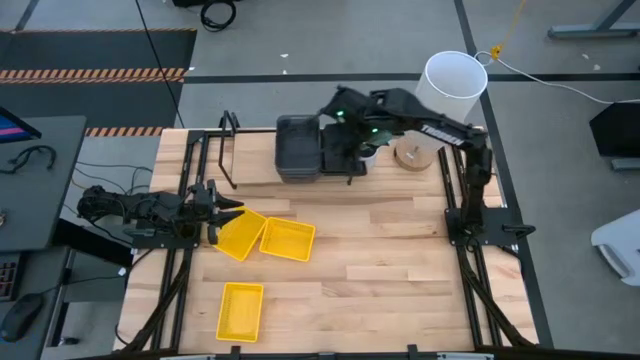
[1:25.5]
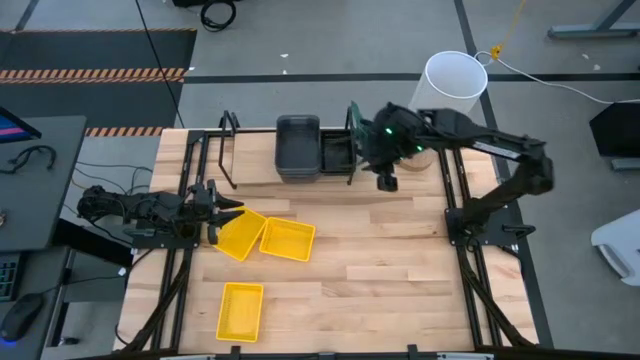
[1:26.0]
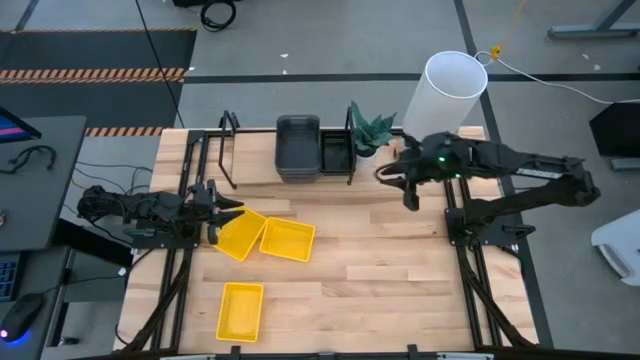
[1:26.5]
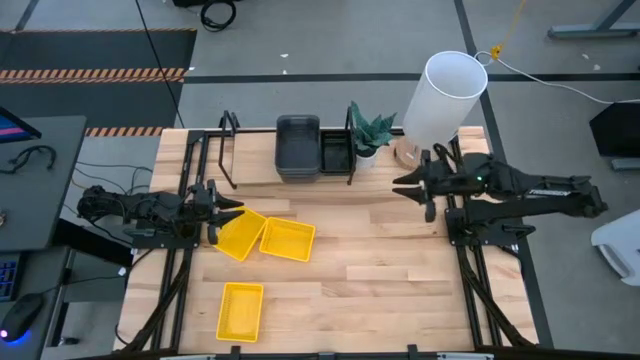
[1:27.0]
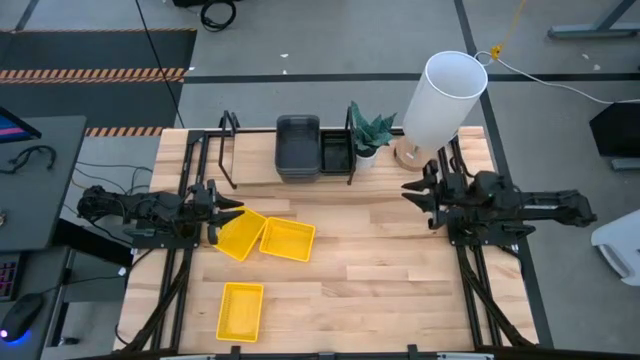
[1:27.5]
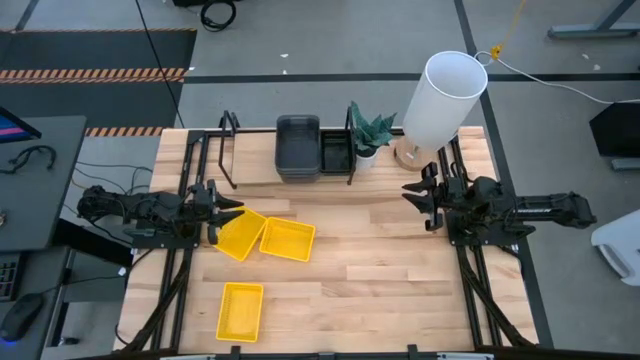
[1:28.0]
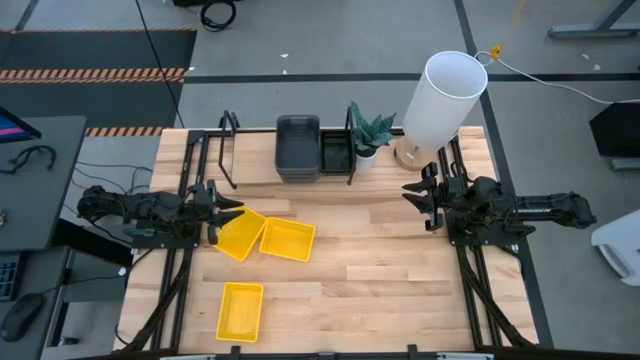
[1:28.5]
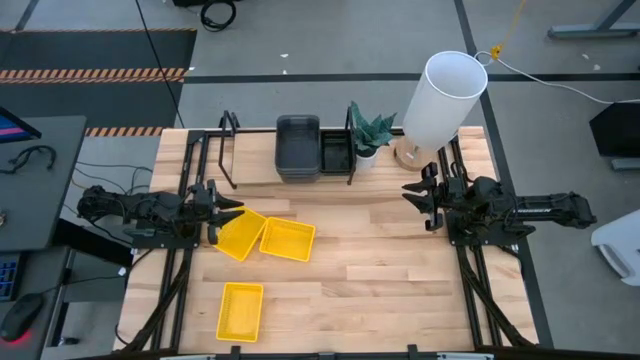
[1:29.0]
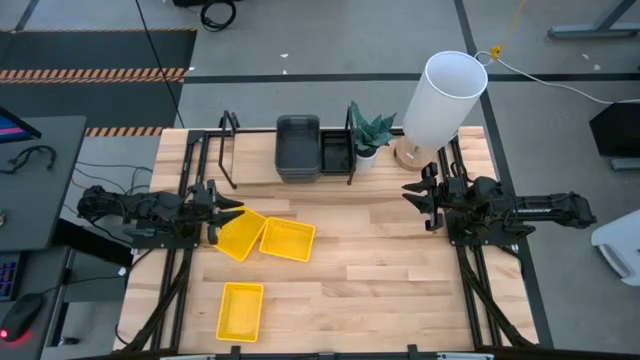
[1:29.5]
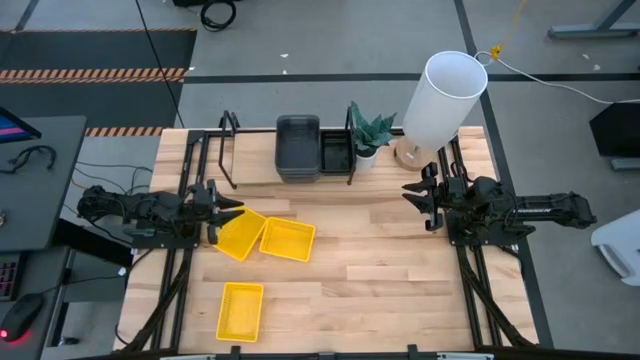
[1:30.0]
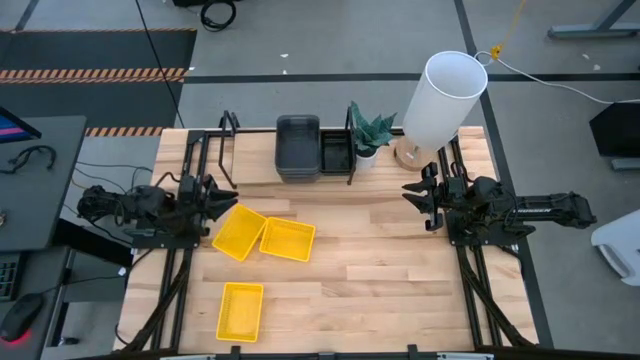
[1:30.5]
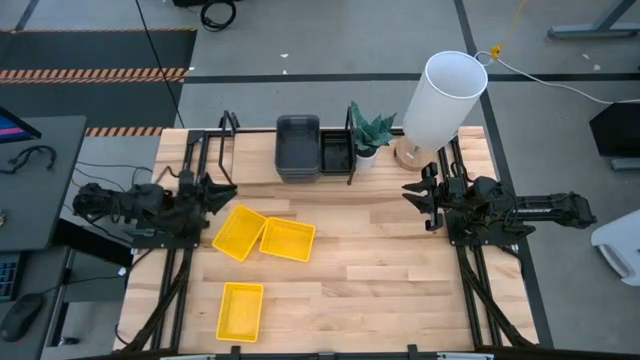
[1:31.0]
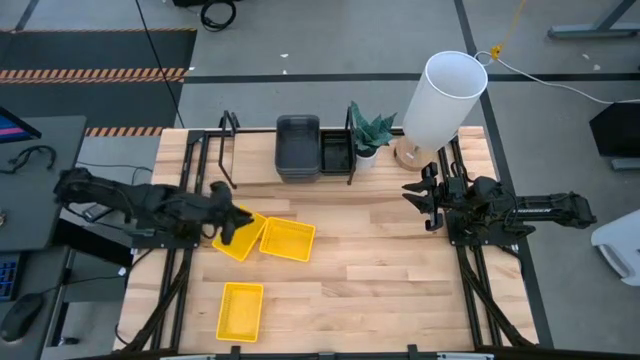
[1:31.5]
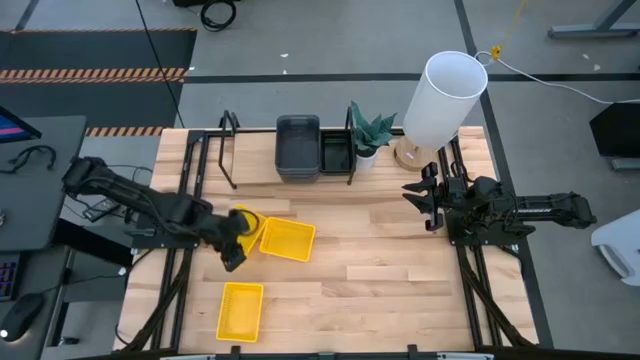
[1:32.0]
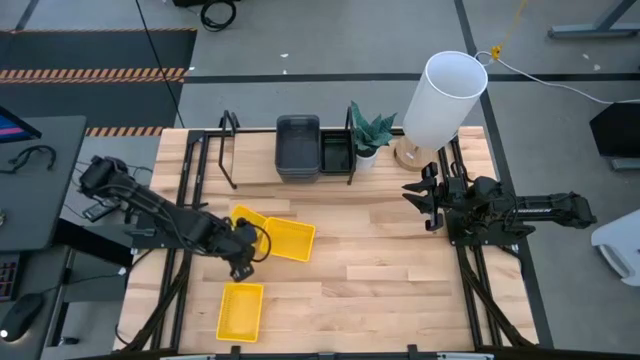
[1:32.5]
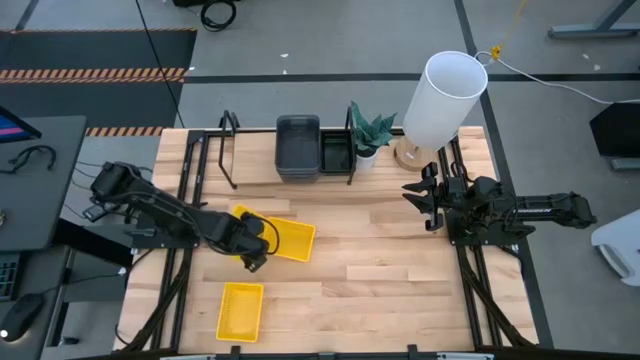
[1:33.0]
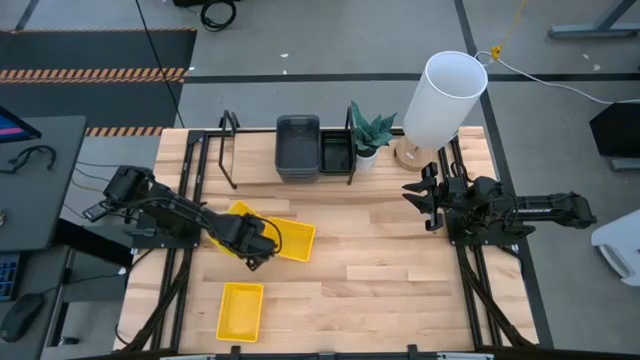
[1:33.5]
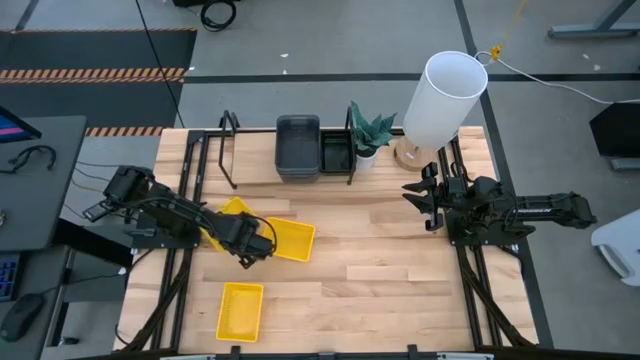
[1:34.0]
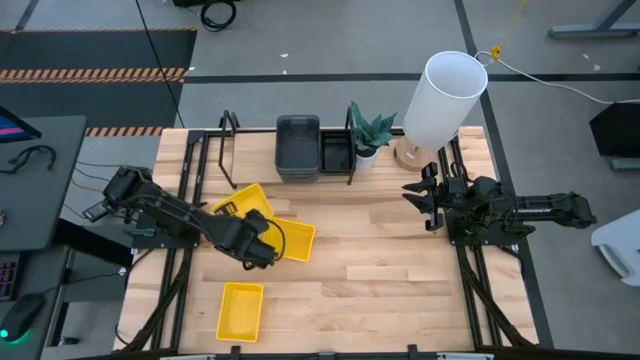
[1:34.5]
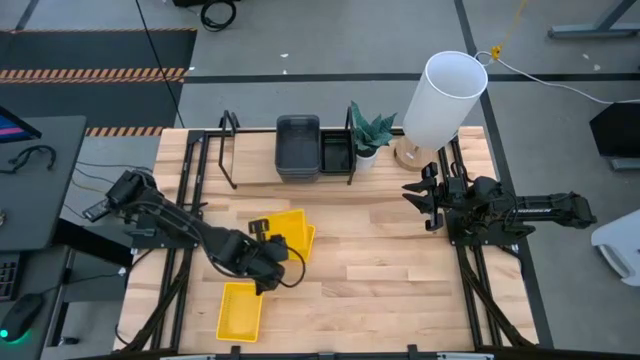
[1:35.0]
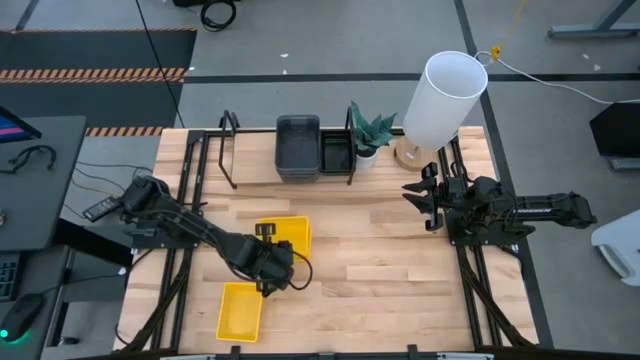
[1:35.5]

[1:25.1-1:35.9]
Task: Stack baskets on shelf by color
Stack the top left yellow bin on the top right yellow bin

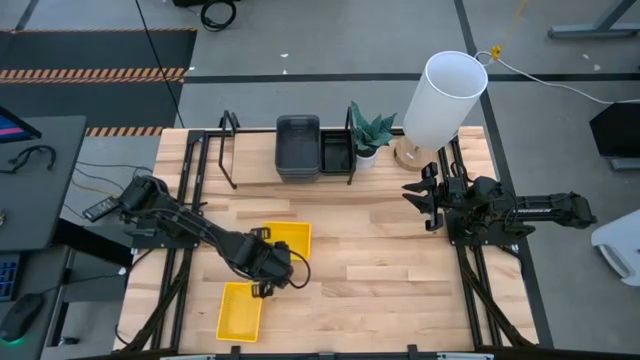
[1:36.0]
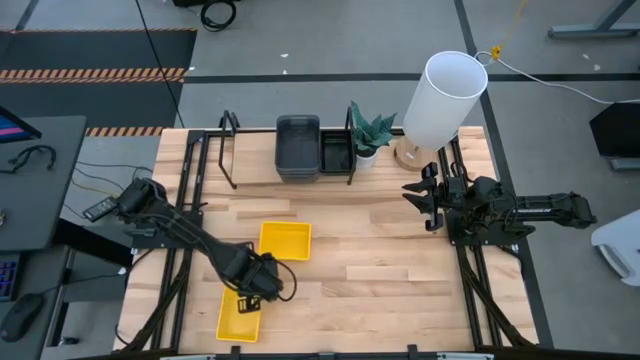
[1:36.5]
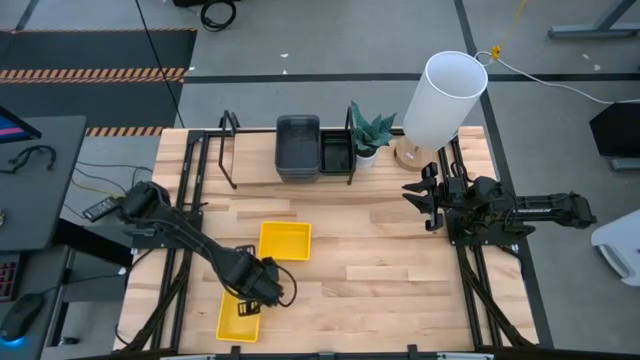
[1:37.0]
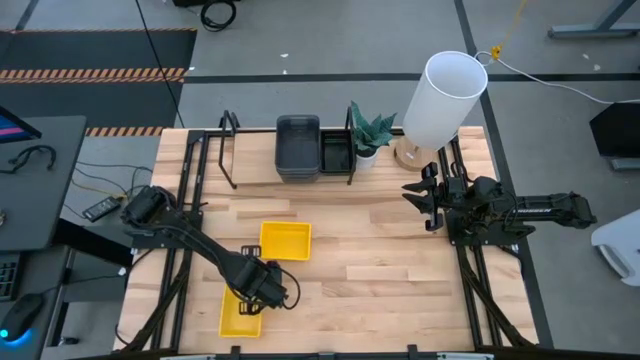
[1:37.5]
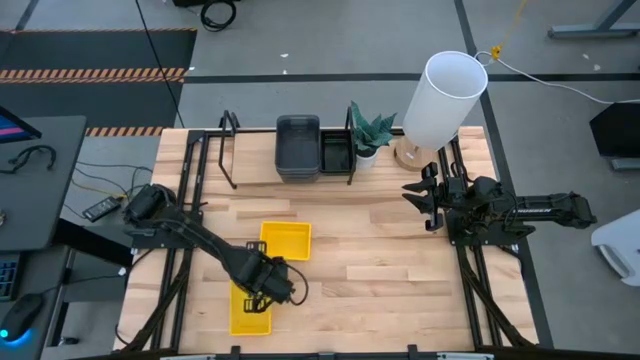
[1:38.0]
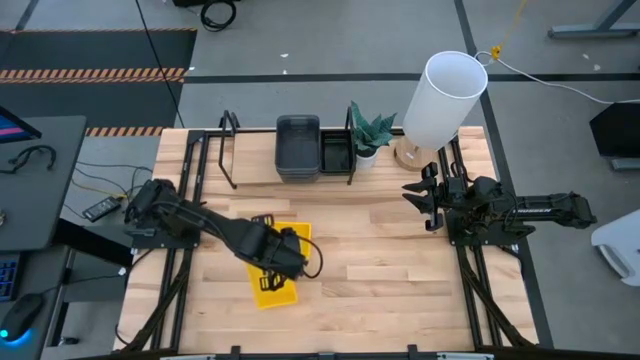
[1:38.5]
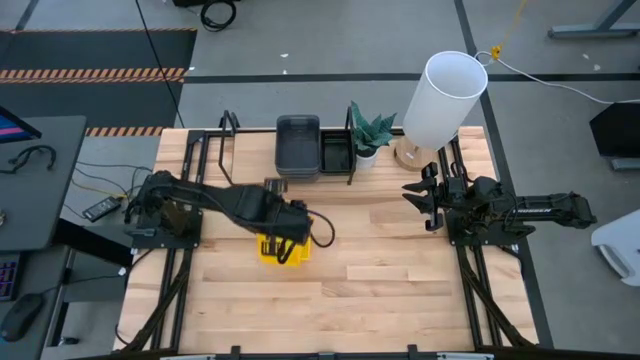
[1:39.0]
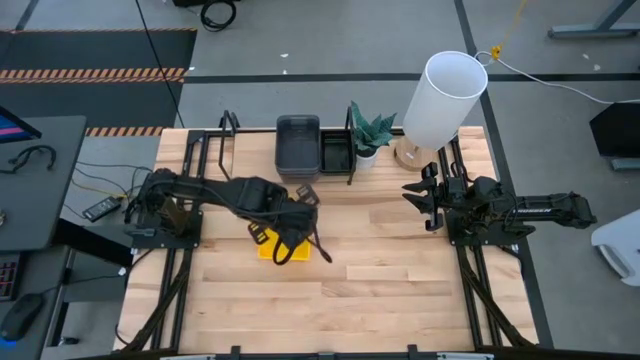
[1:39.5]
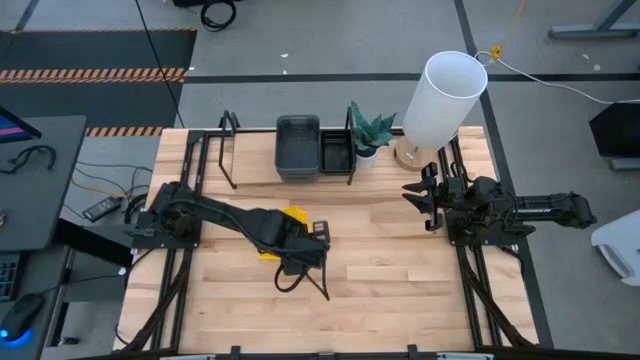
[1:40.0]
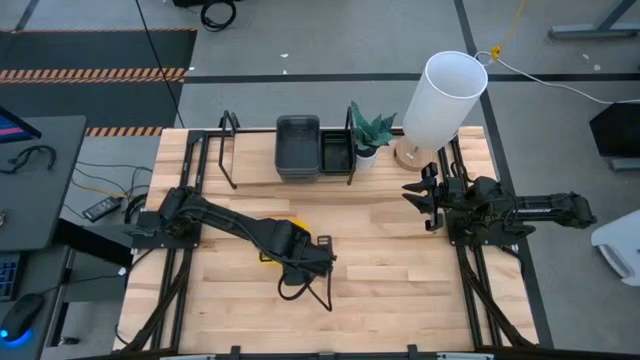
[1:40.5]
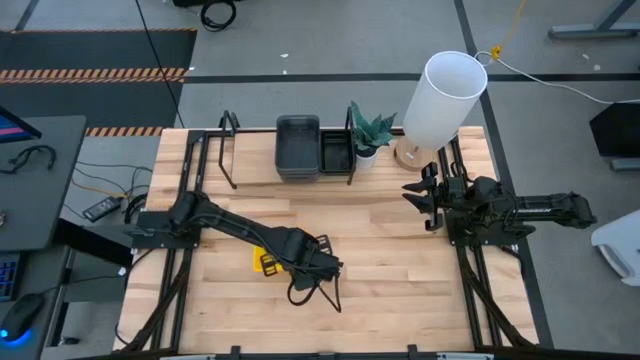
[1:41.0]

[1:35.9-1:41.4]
Stack the bottom yellow bin on the top yellow bin

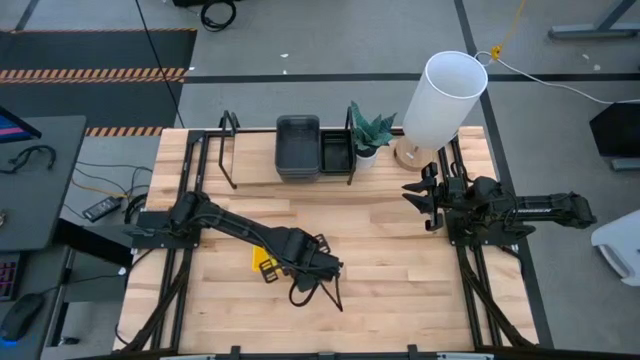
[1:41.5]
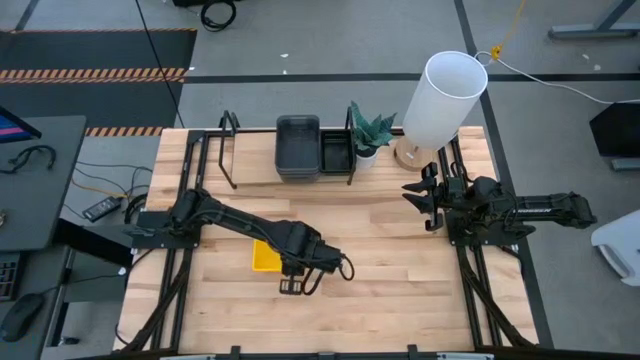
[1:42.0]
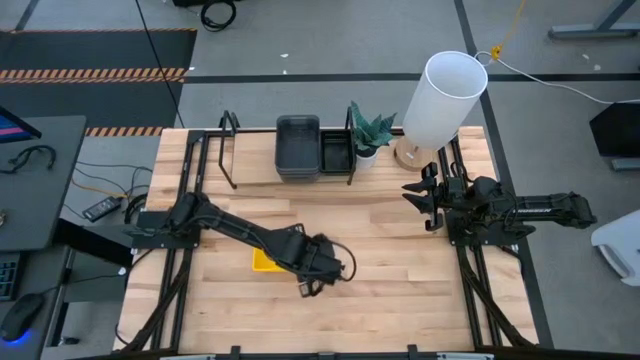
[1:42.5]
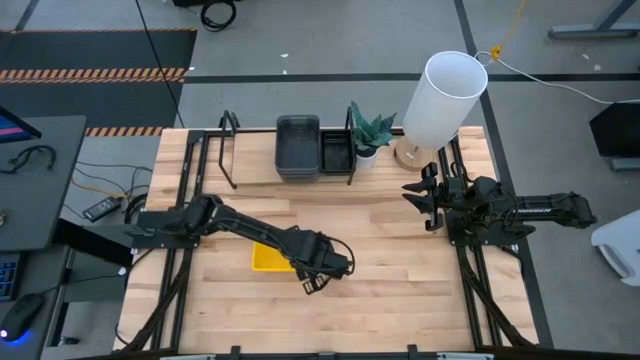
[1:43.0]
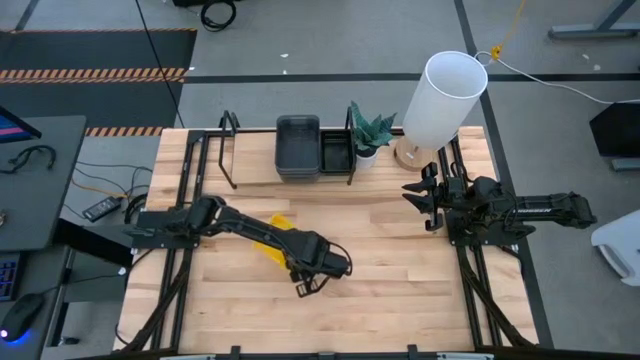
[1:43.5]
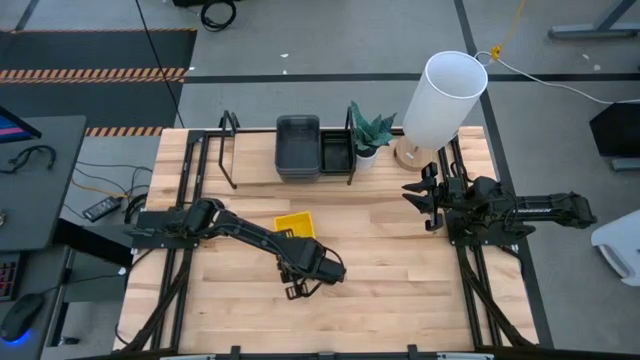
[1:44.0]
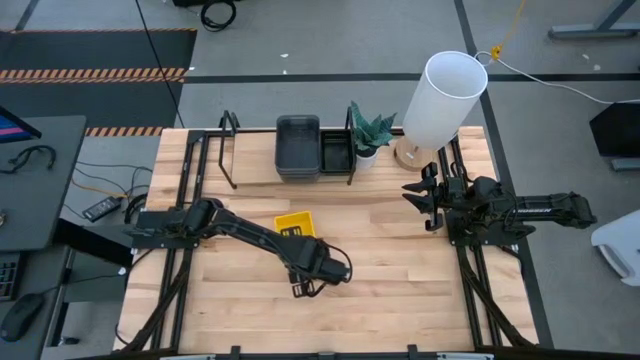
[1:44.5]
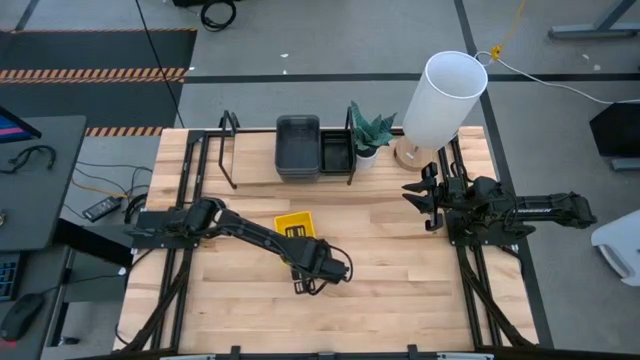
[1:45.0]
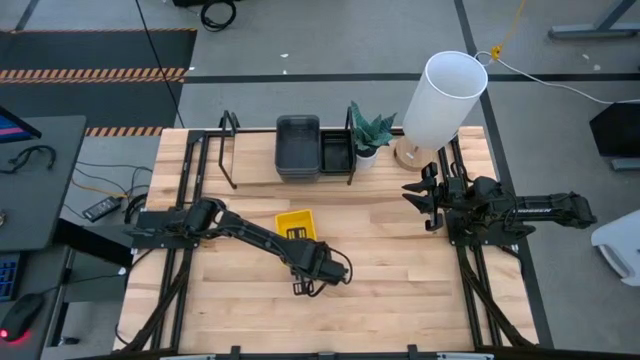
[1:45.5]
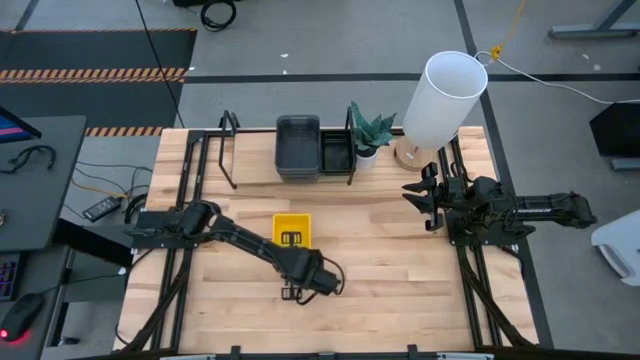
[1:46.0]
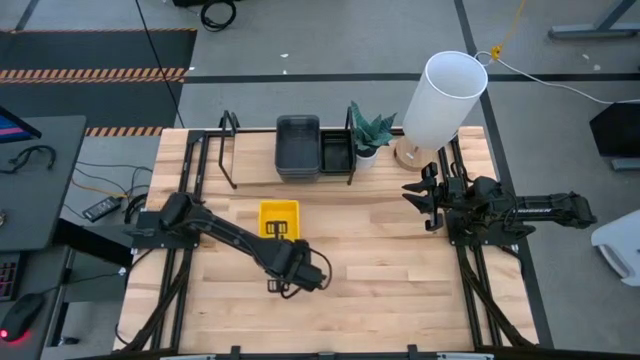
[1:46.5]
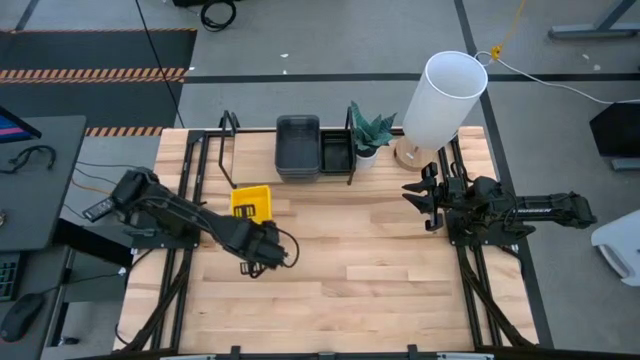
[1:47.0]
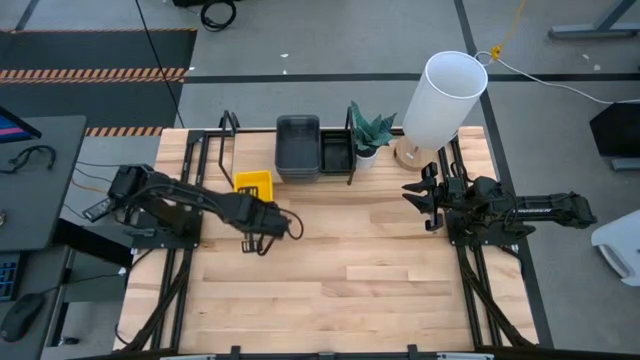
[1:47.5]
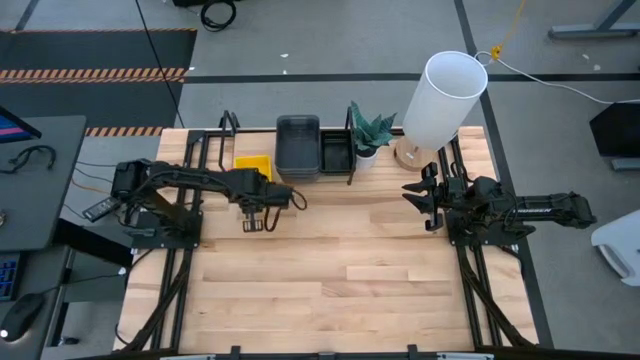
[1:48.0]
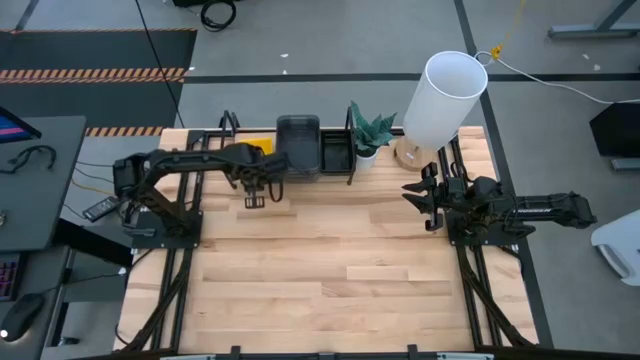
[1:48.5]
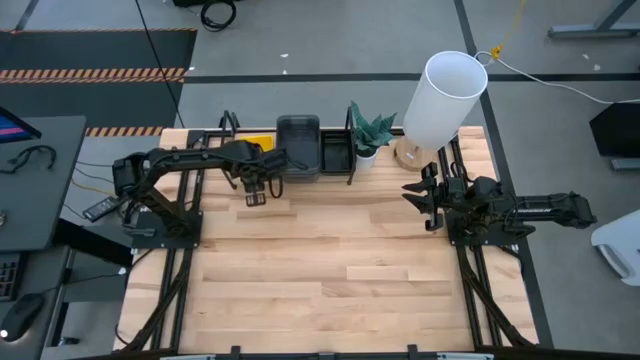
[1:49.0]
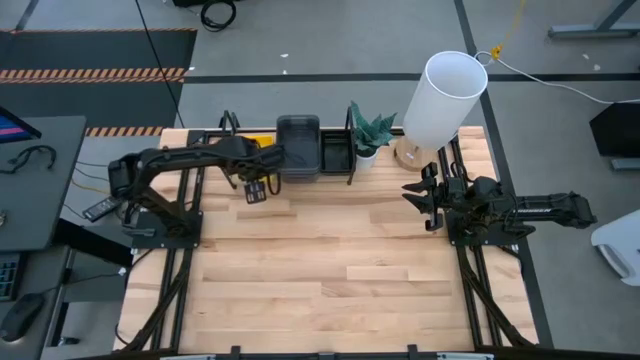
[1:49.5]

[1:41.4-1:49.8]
Put the stacked yellow bins on the shelf
